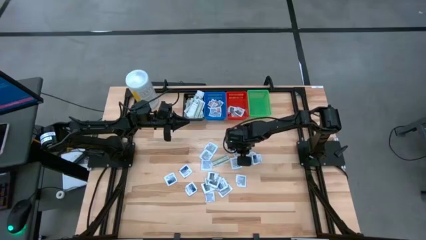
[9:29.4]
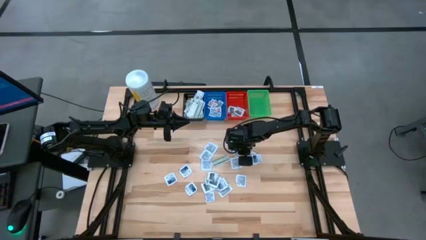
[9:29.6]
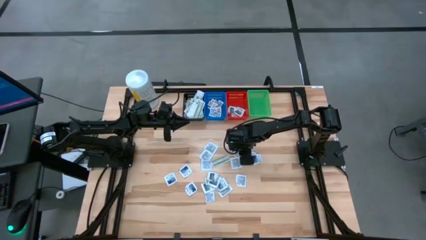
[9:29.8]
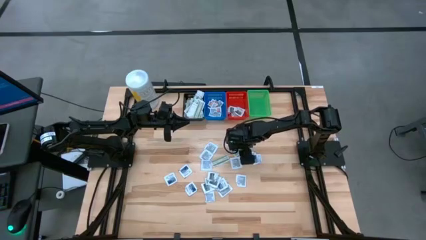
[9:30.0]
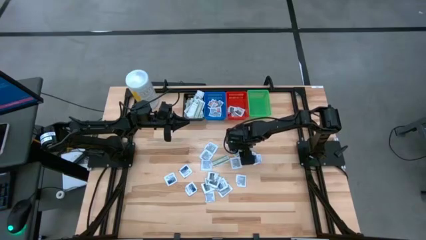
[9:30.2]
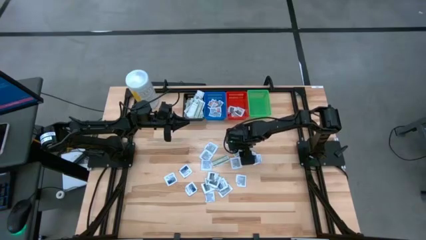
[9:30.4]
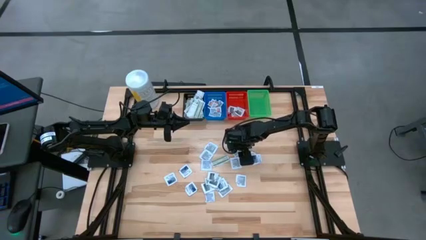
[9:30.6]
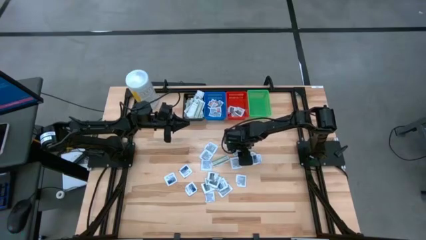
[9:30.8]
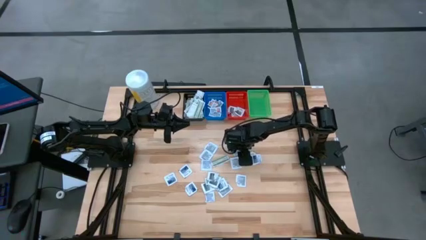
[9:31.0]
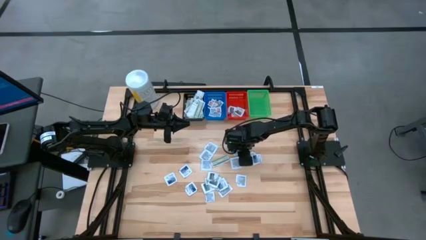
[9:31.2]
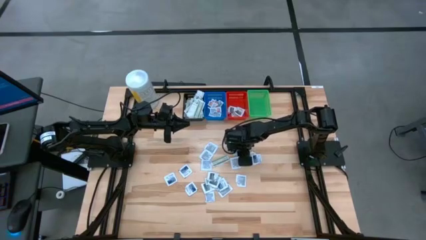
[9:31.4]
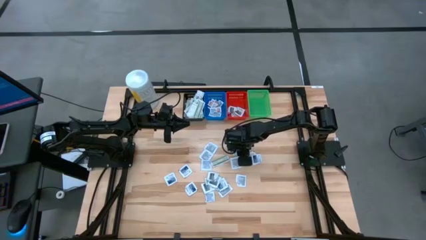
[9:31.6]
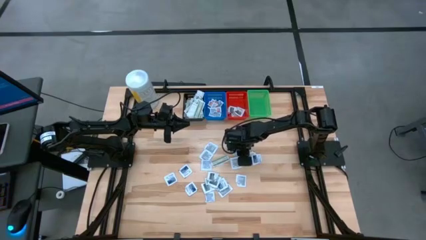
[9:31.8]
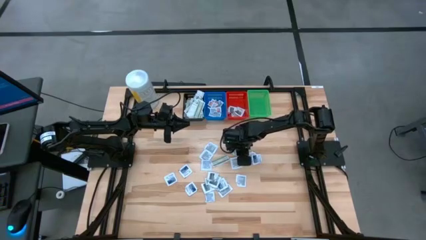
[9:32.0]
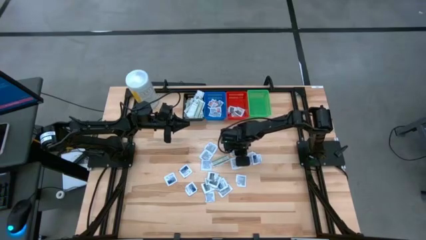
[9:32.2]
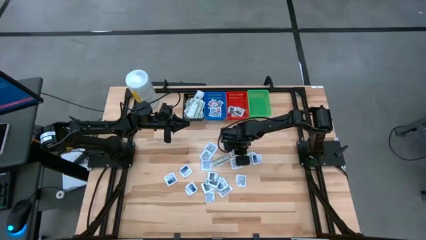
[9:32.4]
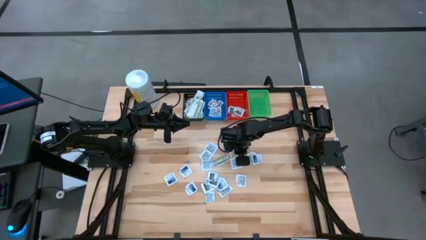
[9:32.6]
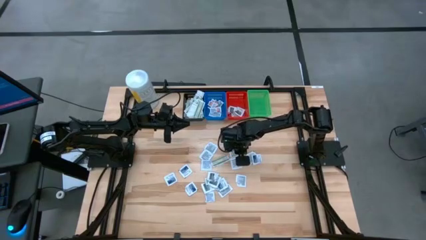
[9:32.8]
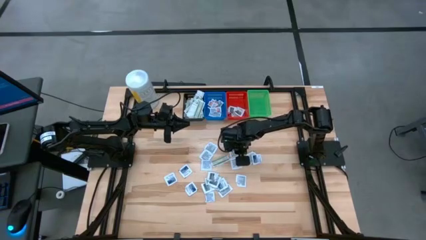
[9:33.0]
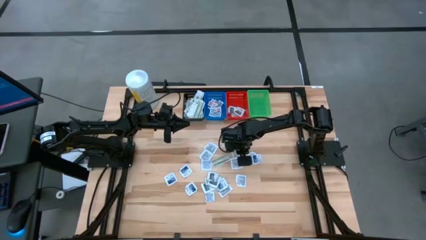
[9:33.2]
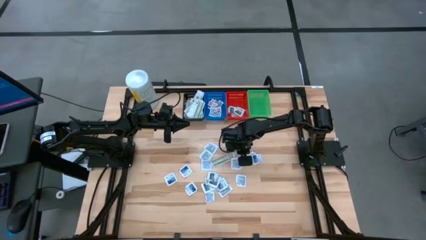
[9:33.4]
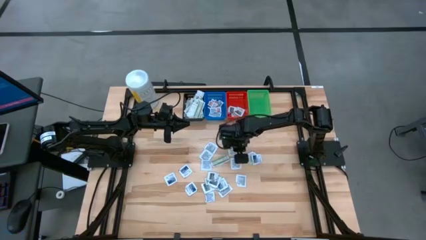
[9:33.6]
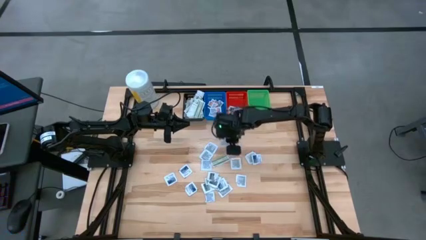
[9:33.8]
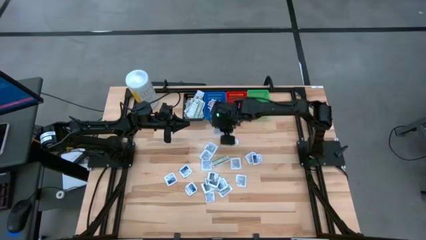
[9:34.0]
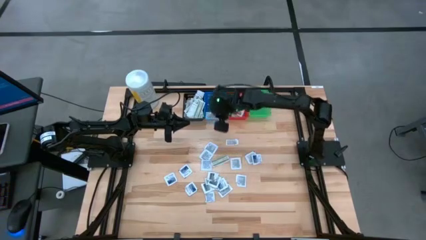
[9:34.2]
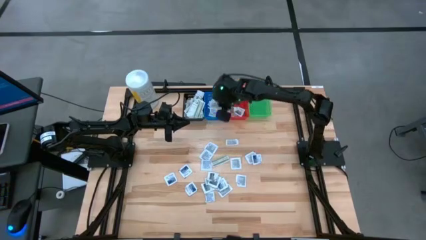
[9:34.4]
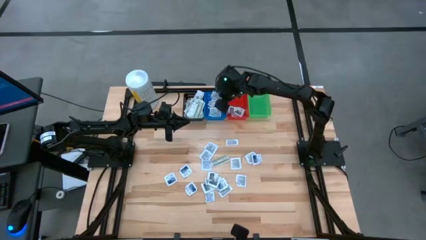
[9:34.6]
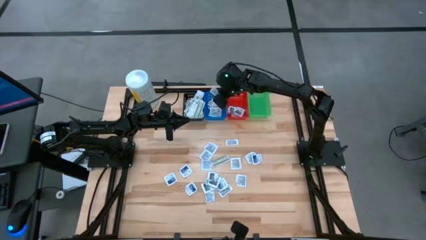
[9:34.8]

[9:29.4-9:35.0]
Task: Pick & Place First Aid Supplies
Put the orange ointment pack in the blue bin

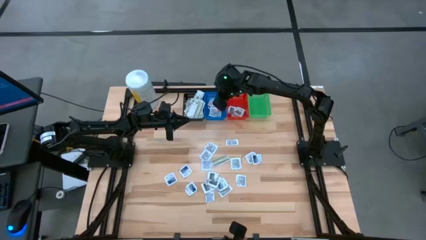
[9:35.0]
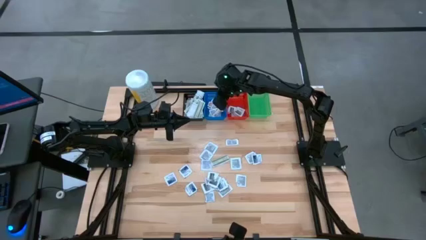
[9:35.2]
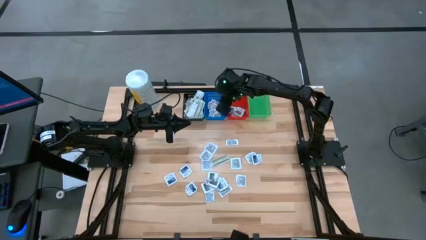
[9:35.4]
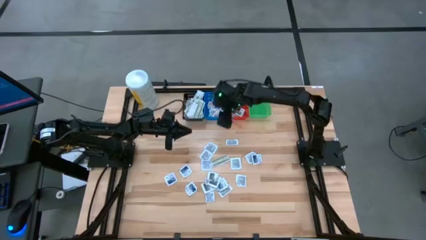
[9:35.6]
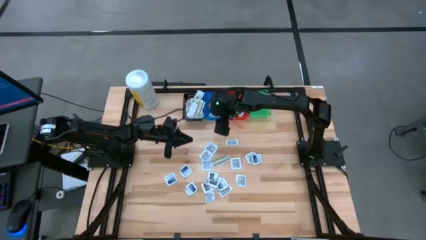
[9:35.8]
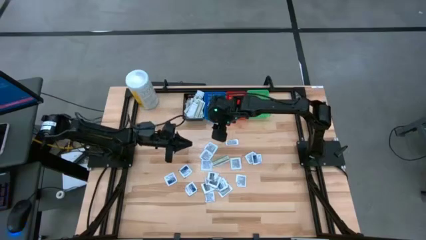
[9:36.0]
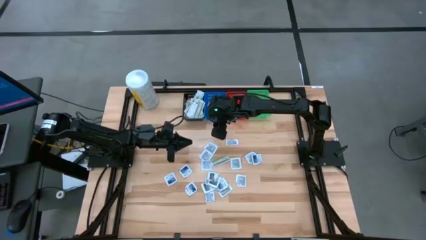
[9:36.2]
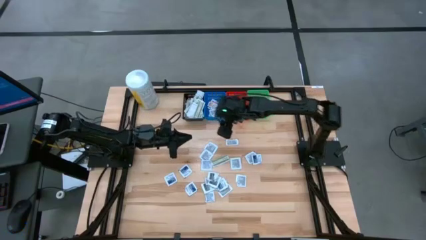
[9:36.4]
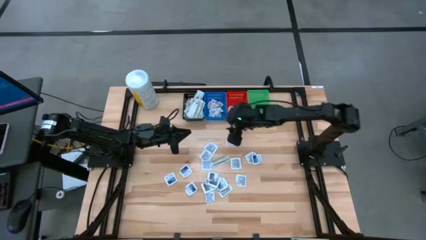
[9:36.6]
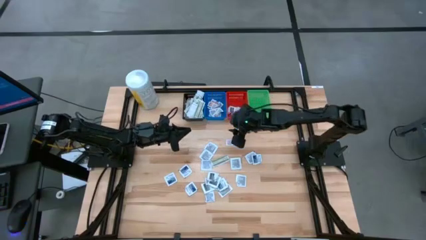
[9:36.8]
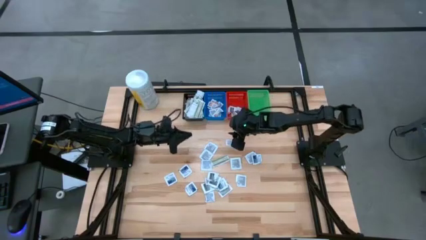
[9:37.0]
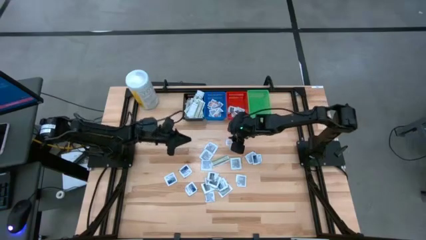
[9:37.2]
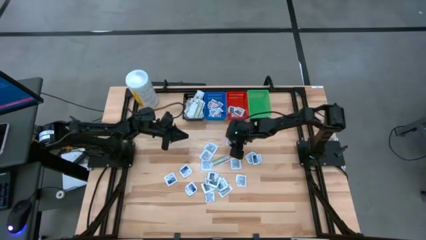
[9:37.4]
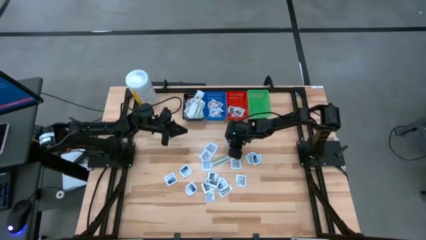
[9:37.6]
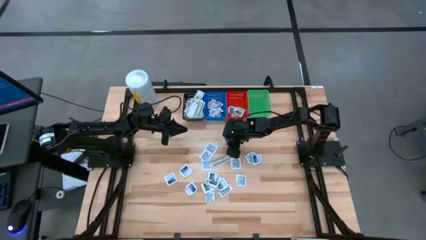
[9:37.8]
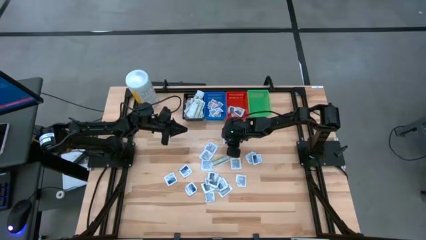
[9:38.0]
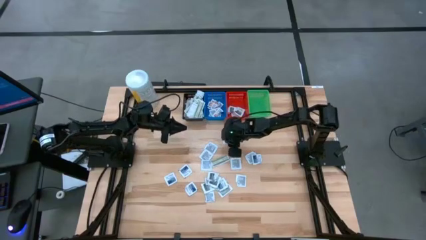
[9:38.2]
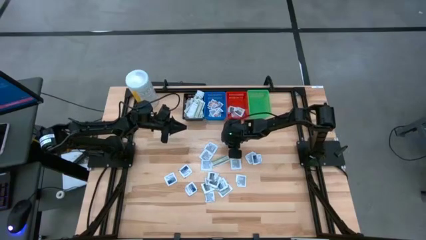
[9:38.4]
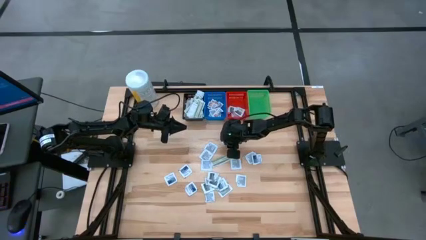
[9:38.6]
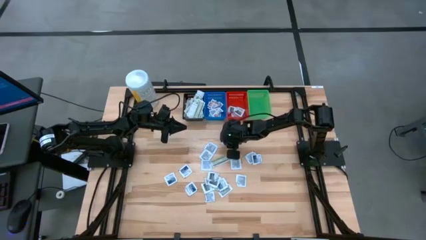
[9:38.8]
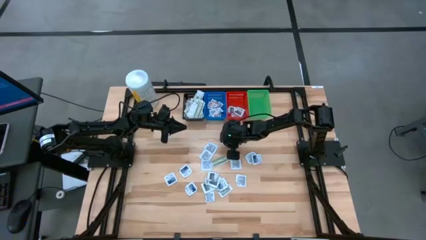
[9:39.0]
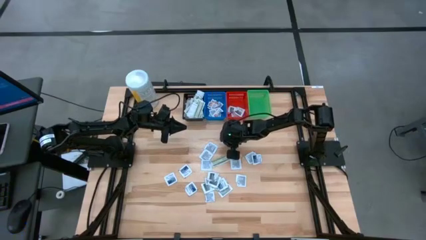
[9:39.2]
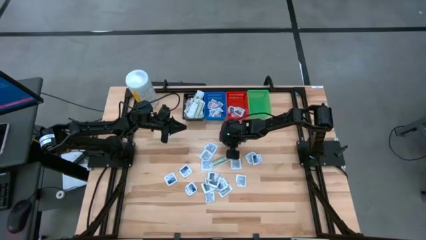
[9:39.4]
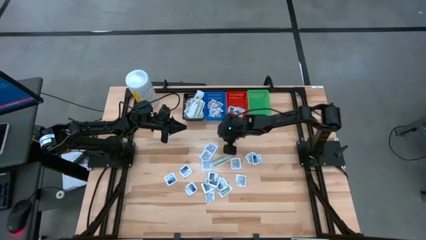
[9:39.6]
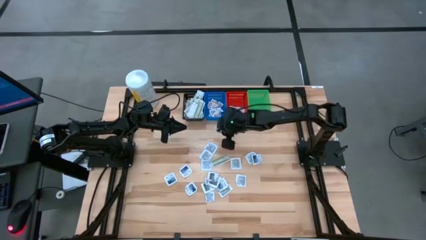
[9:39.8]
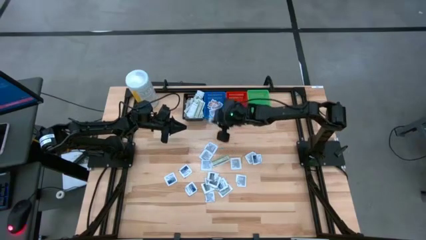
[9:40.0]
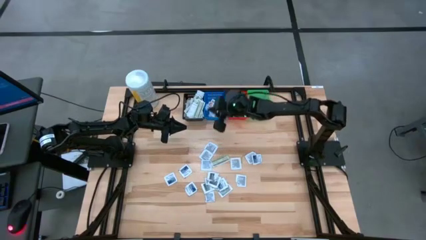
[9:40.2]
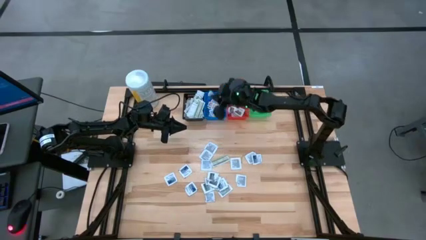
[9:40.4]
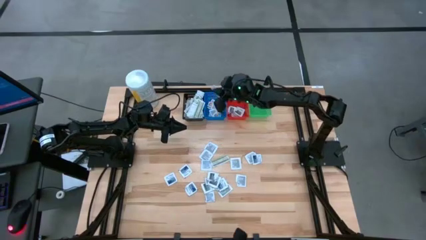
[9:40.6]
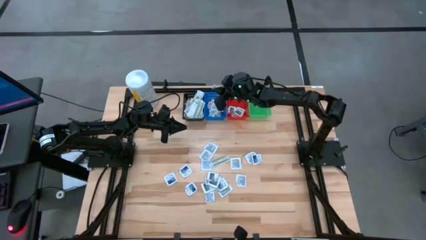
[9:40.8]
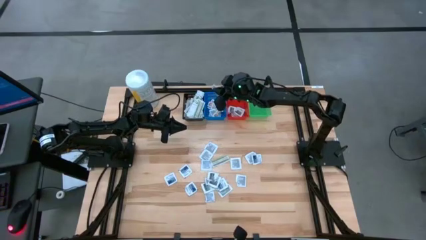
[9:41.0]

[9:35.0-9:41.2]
Put the orange ointment pack in the blue bin
